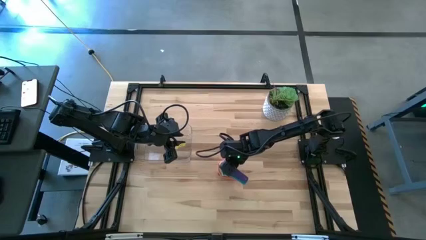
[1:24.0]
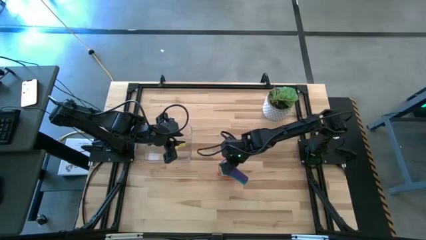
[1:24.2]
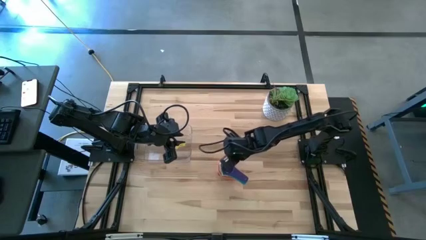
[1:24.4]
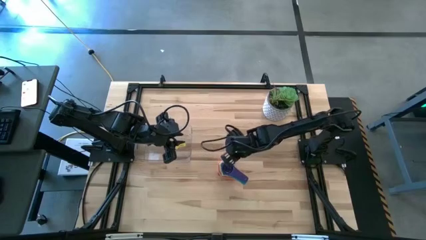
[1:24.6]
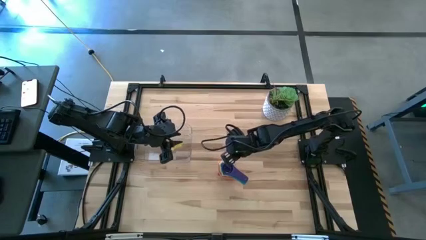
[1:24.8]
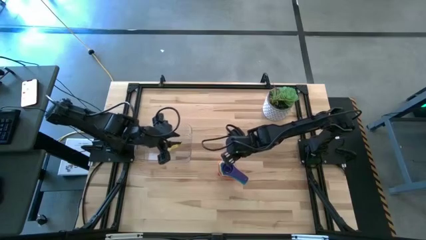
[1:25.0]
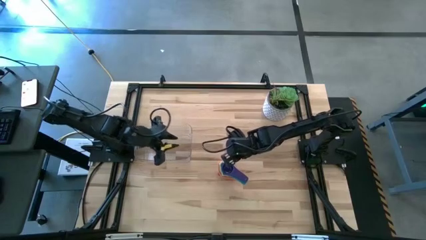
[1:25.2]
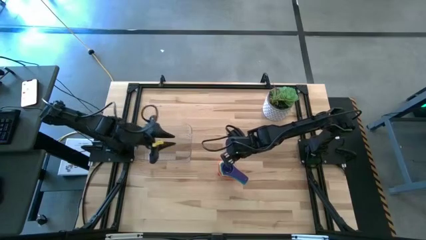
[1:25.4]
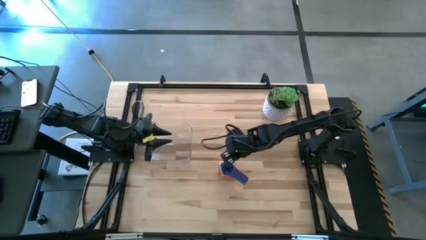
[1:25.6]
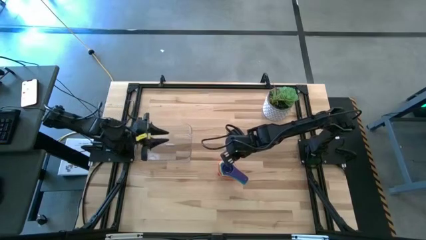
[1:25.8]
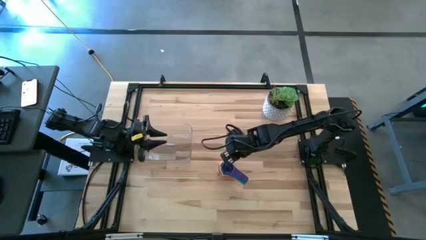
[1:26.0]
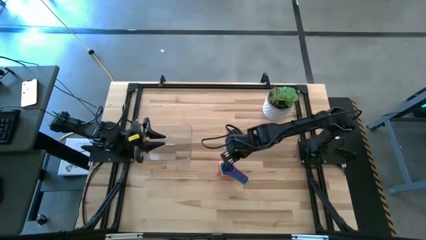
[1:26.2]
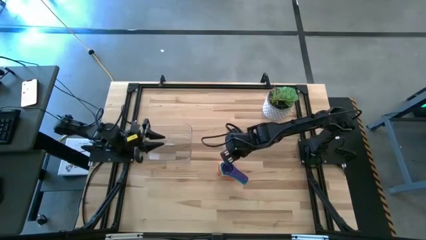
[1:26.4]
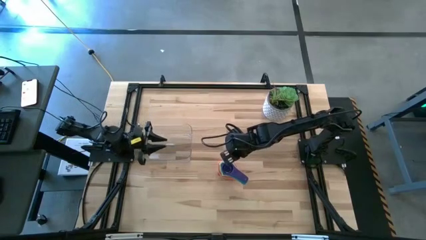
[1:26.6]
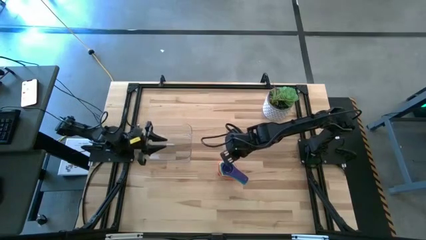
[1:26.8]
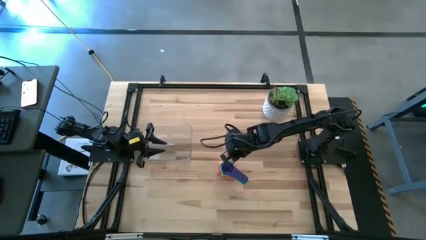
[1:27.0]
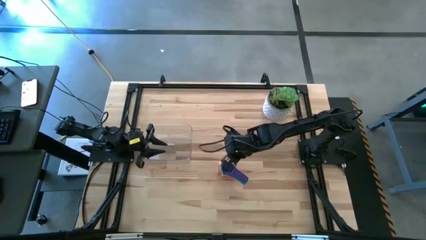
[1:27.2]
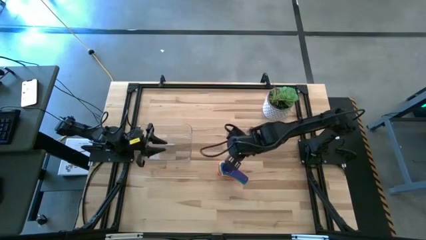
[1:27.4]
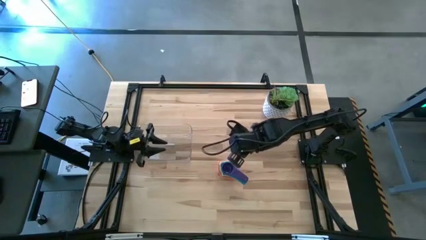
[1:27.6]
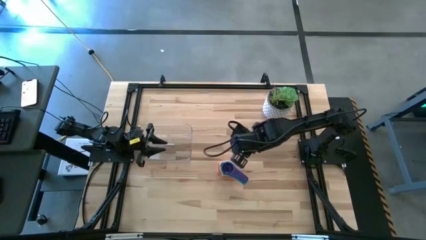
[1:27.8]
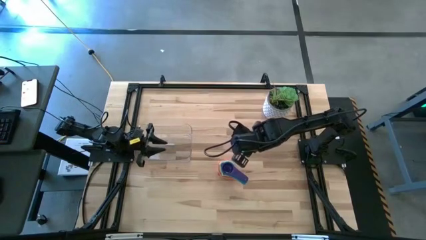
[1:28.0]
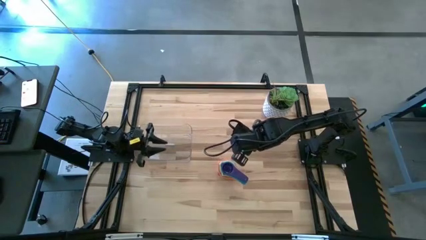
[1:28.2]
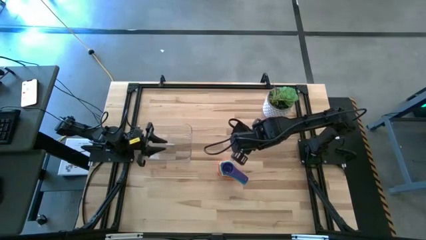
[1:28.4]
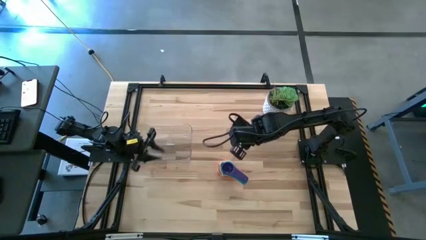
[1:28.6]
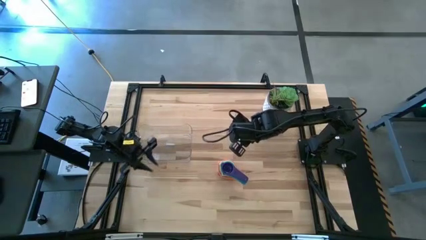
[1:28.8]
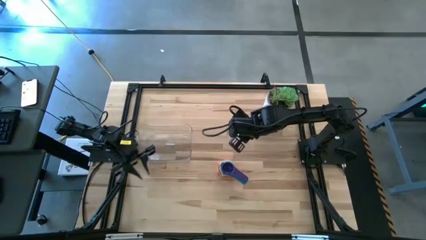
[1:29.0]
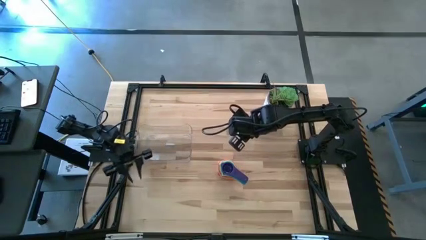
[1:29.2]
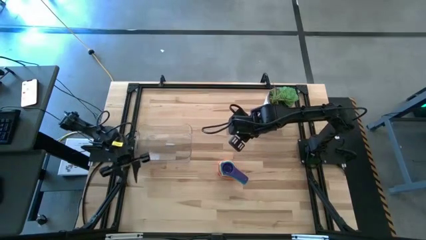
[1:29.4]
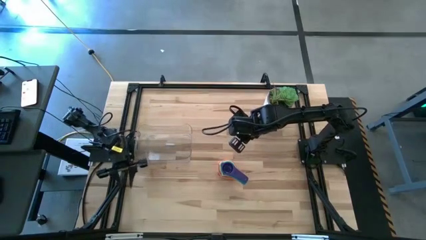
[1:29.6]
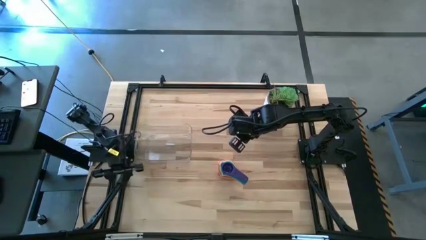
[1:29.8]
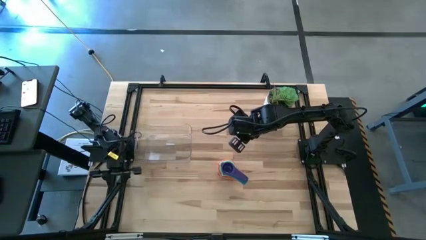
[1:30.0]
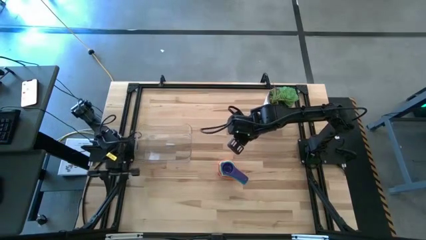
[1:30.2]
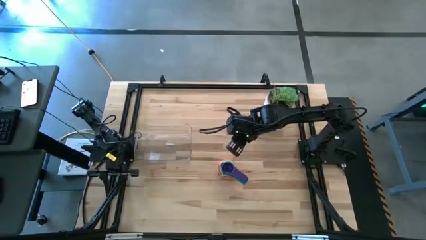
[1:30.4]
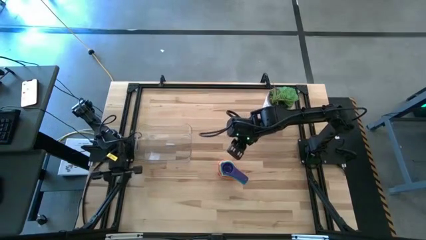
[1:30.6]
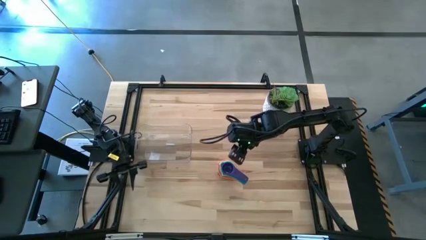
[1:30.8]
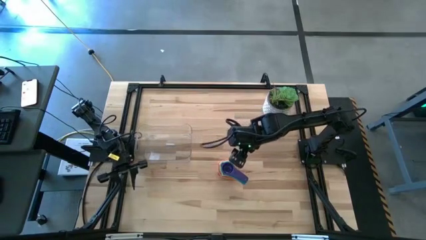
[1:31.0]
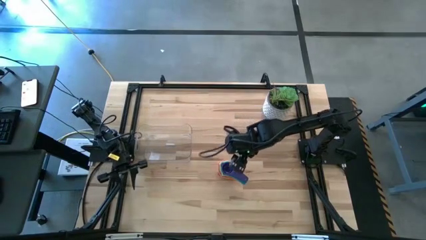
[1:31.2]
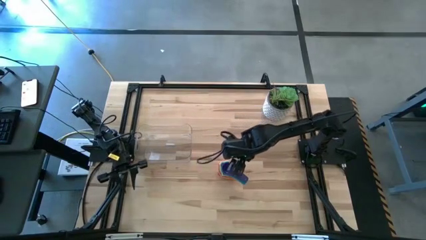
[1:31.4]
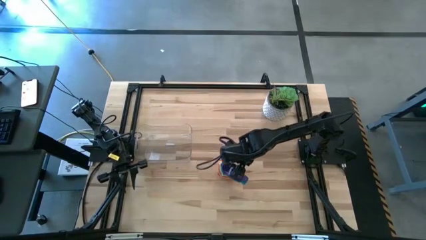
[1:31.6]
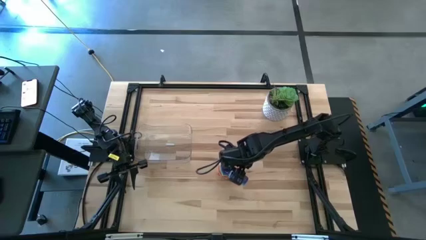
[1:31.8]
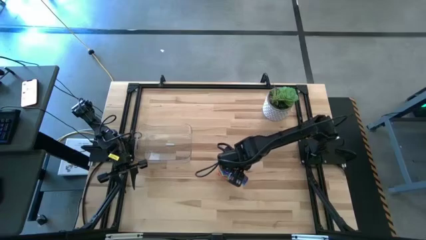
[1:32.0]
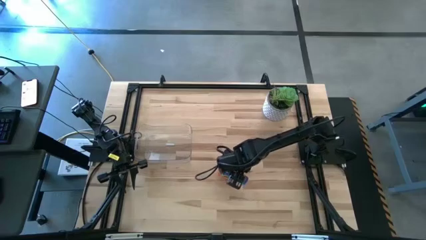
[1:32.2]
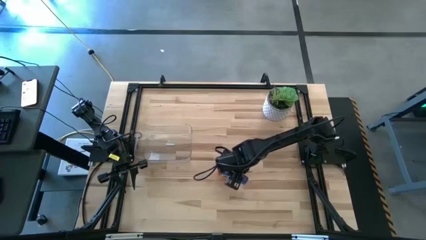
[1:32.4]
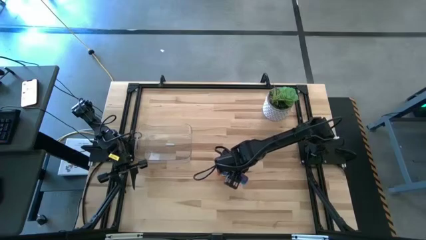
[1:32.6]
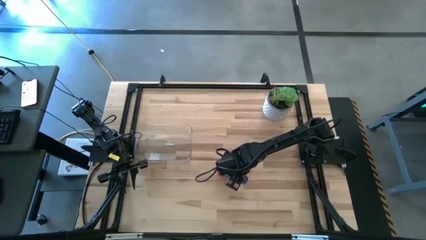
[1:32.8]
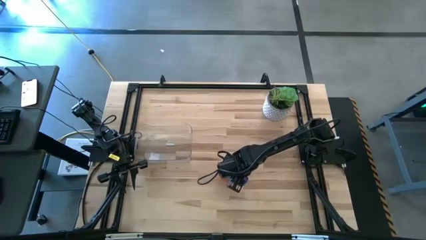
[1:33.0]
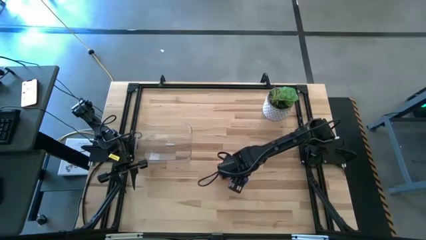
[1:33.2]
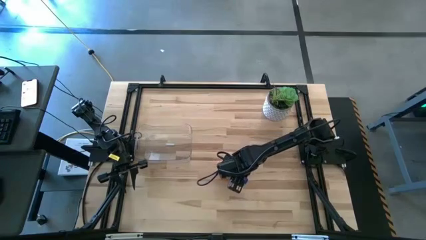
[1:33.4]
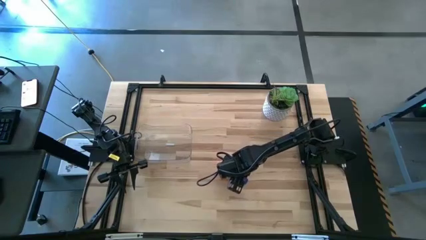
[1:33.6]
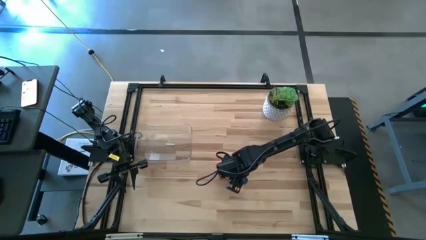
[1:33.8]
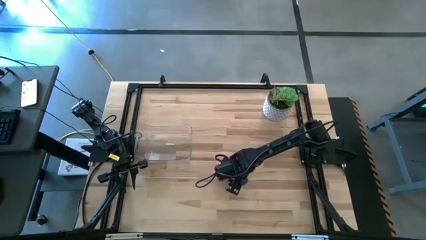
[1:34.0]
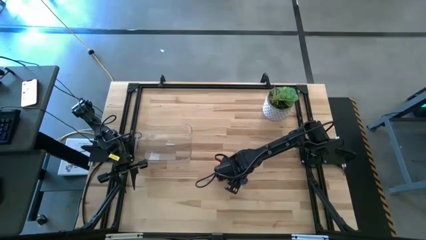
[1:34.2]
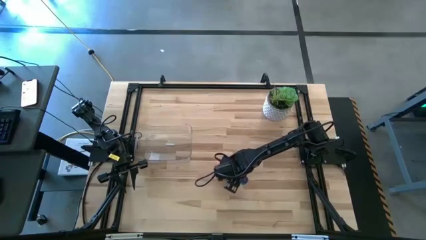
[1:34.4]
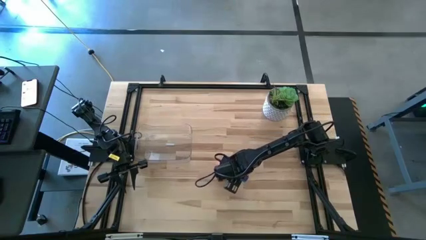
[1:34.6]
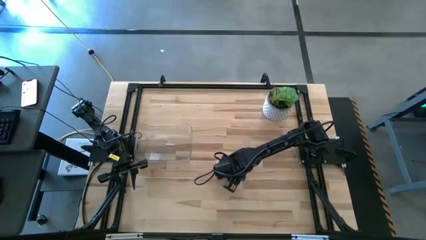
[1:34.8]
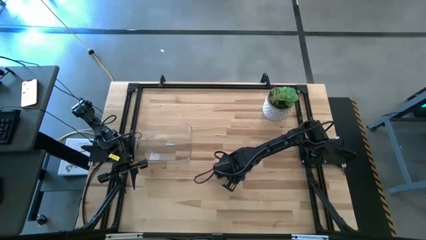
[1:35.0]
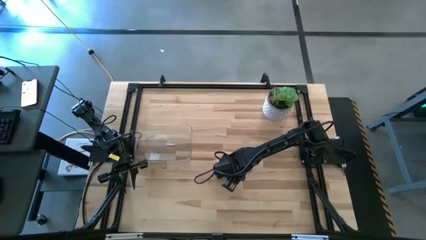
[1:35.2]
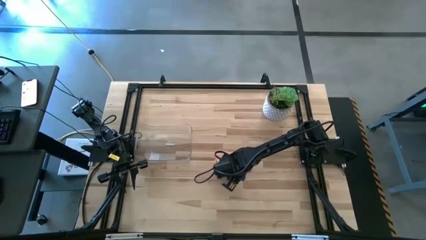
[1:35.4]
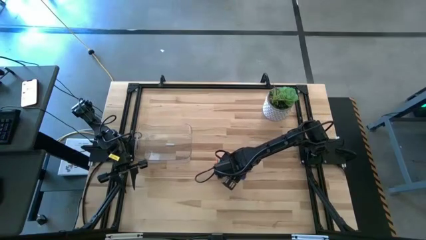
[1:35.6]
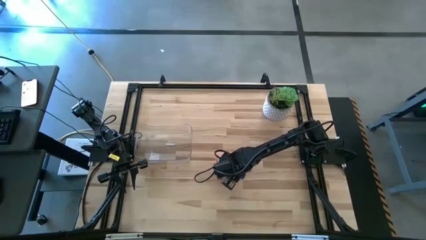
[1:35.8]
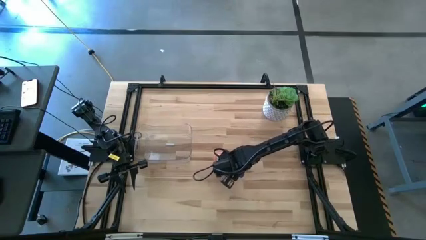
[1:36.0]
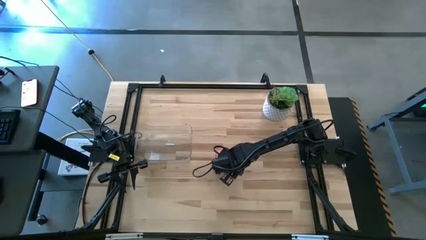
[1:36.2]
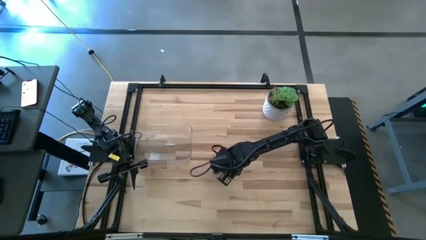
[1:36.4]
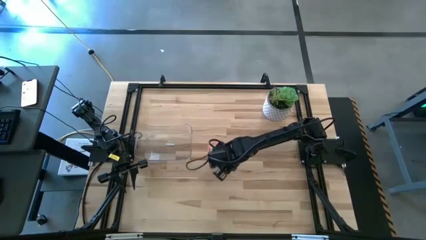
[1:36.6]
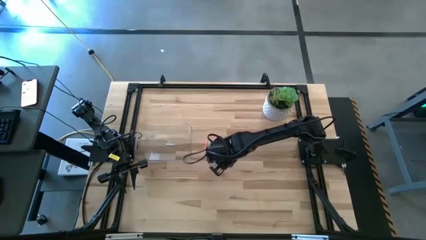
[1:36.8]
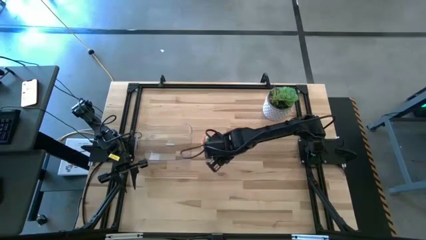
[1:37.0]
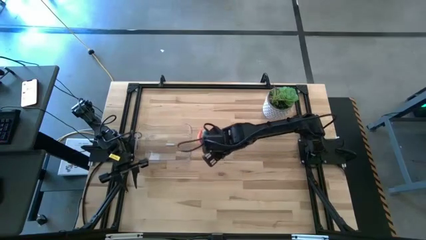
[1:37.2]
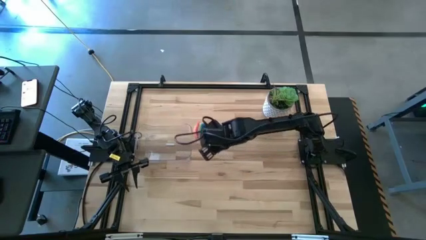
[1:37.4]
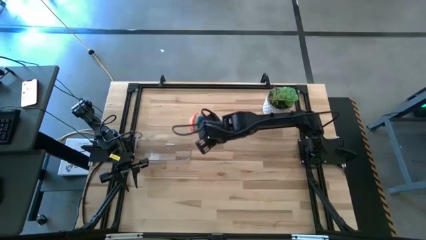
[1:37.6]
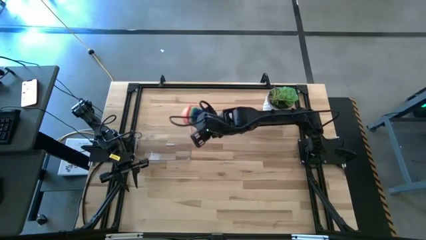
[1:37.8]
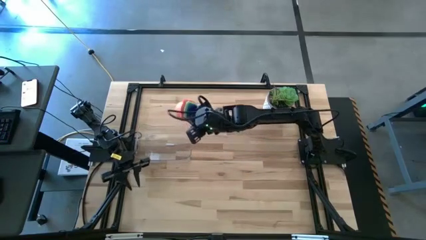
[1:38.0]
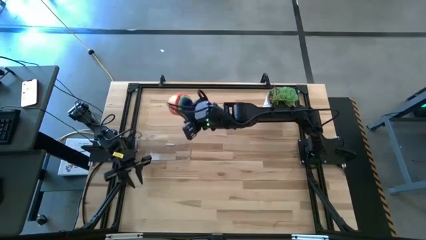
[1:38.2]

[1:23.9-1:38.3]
Task: Nest measuring cups in basket
Put the measuring cups on the transparent bin
